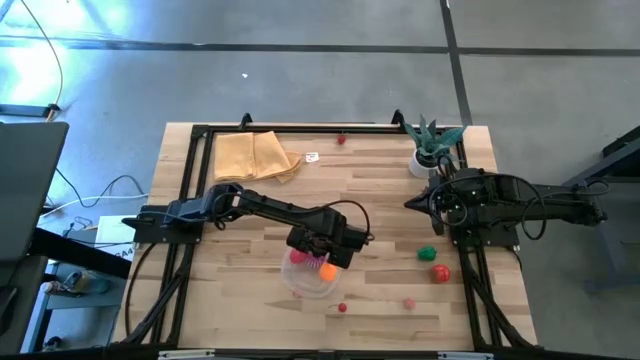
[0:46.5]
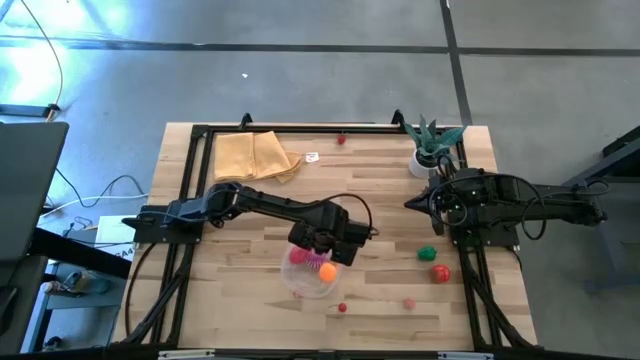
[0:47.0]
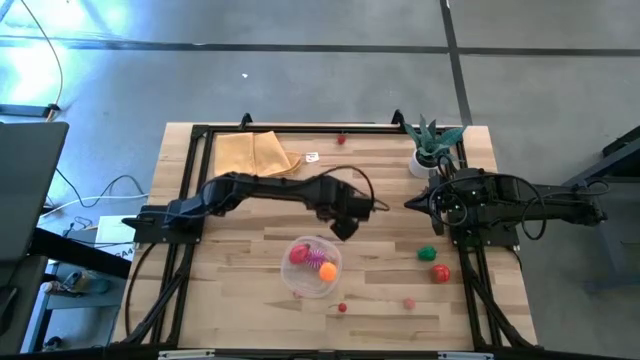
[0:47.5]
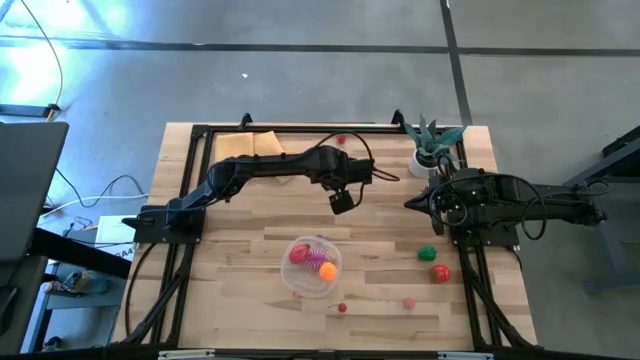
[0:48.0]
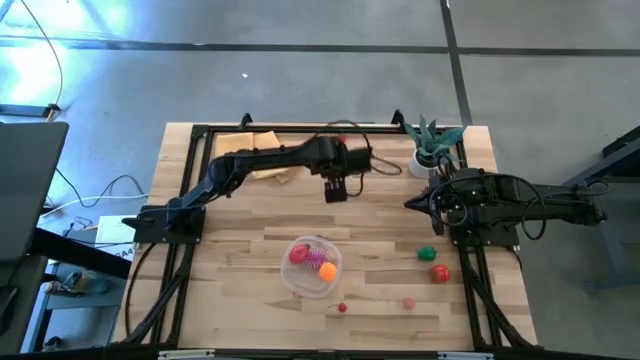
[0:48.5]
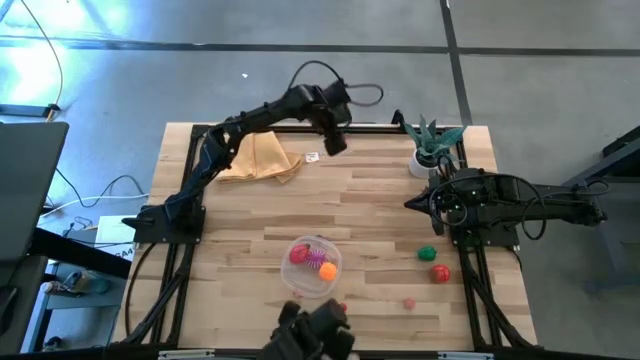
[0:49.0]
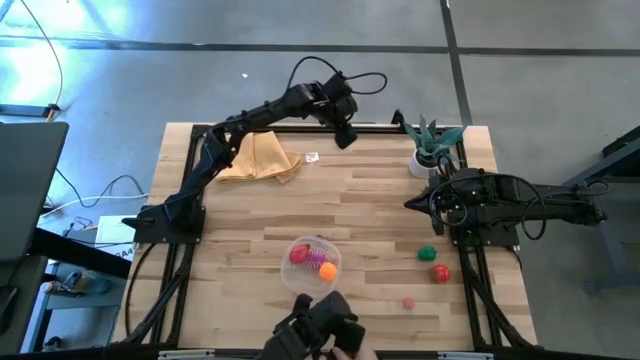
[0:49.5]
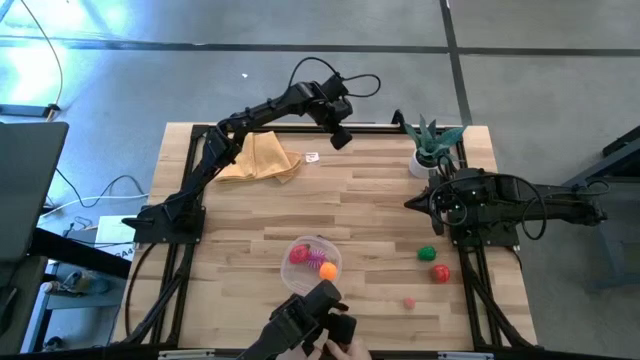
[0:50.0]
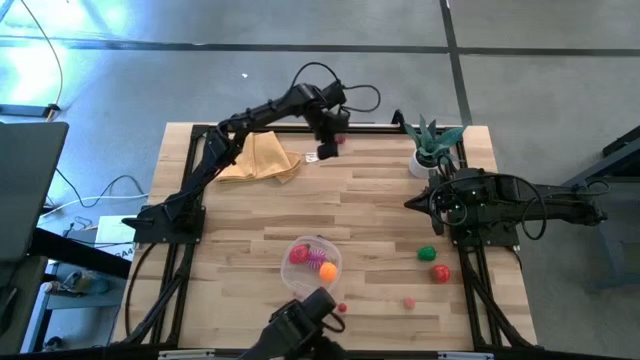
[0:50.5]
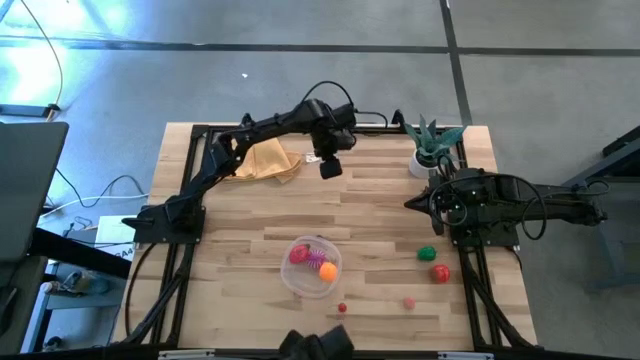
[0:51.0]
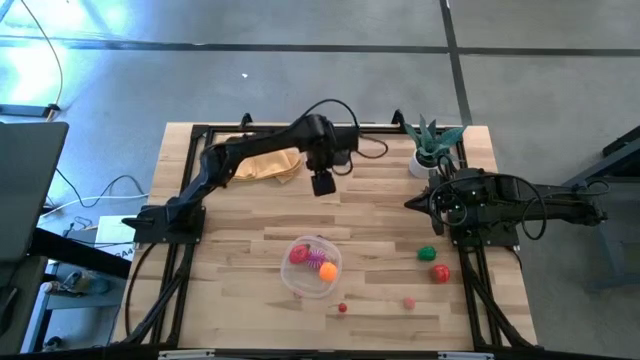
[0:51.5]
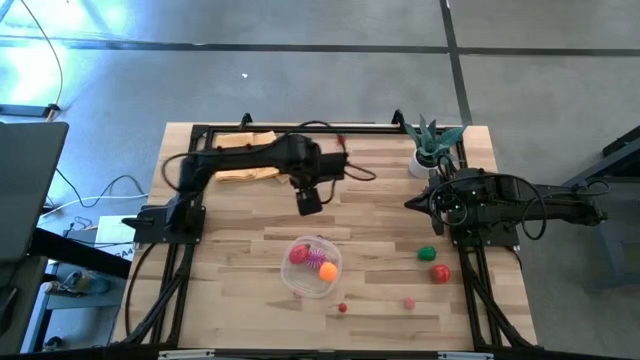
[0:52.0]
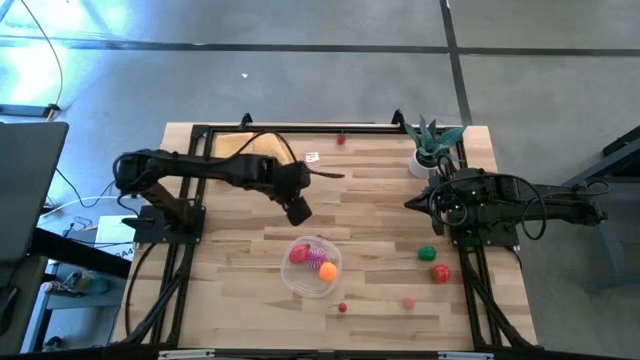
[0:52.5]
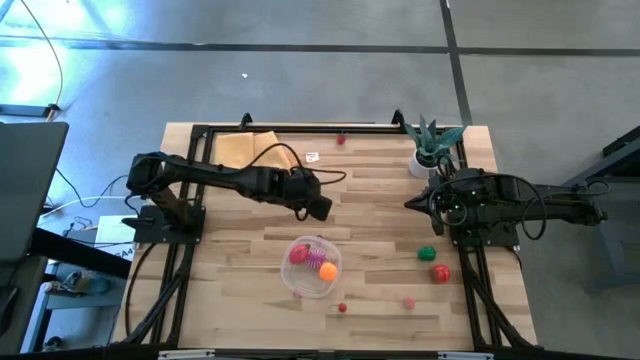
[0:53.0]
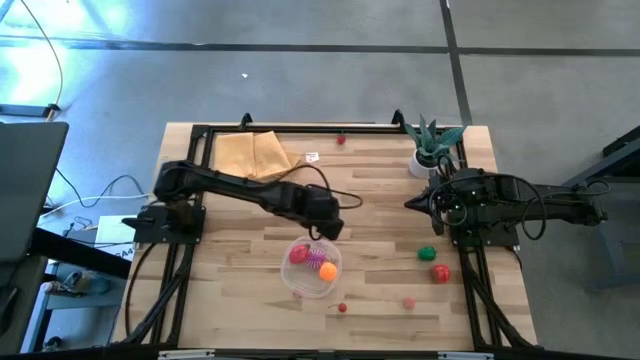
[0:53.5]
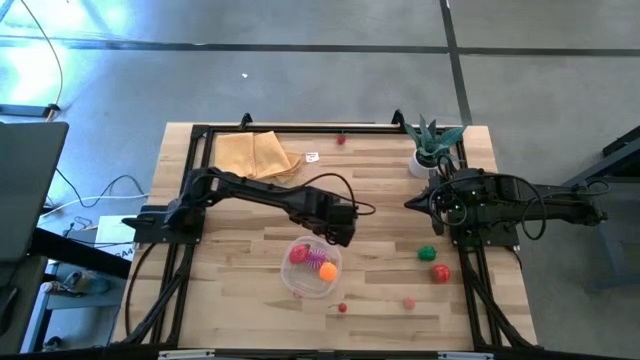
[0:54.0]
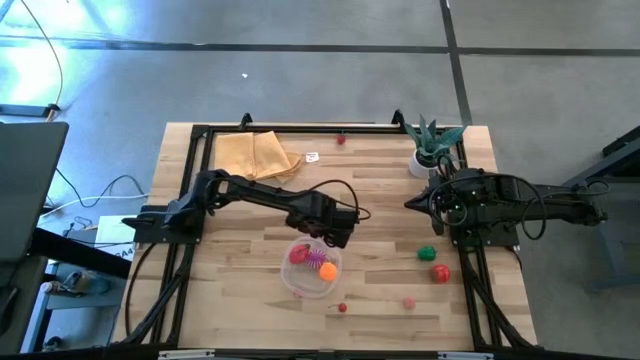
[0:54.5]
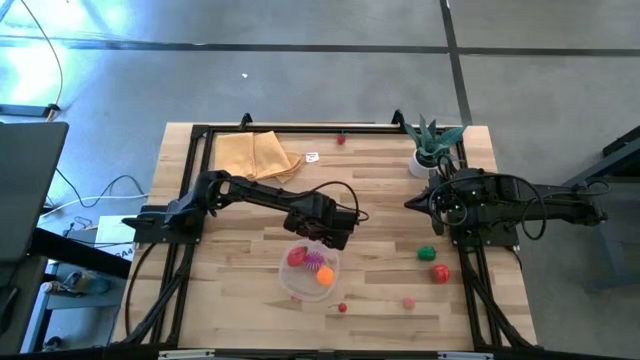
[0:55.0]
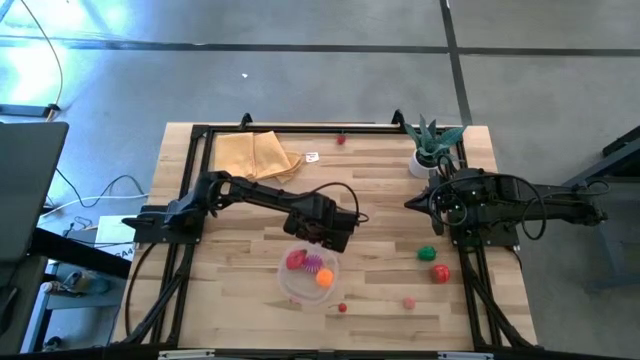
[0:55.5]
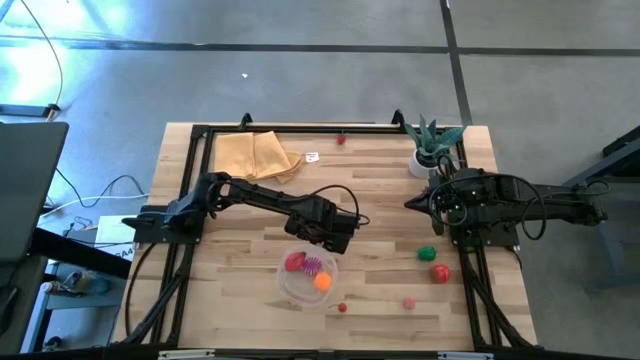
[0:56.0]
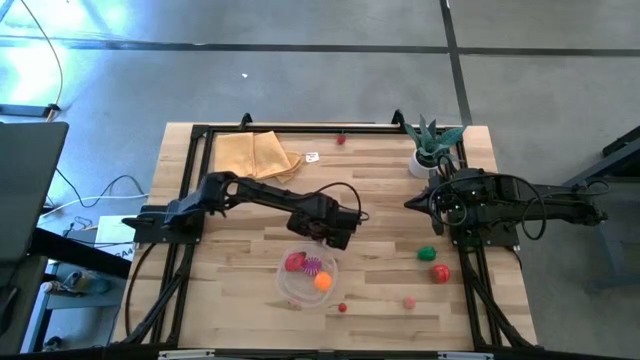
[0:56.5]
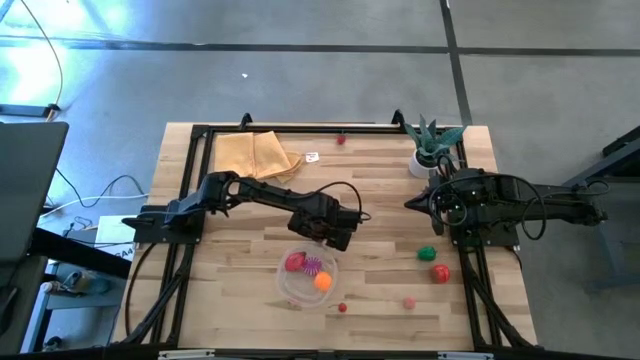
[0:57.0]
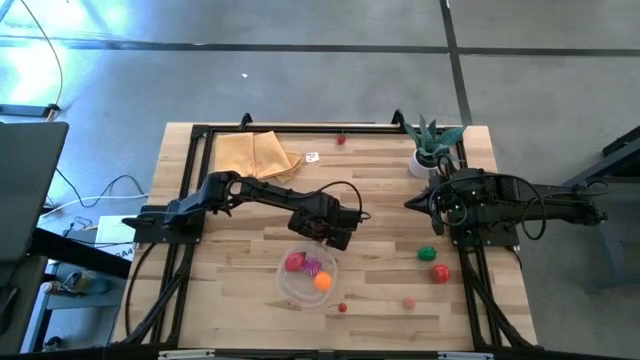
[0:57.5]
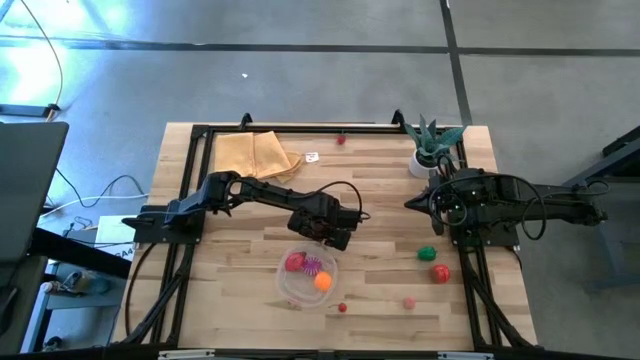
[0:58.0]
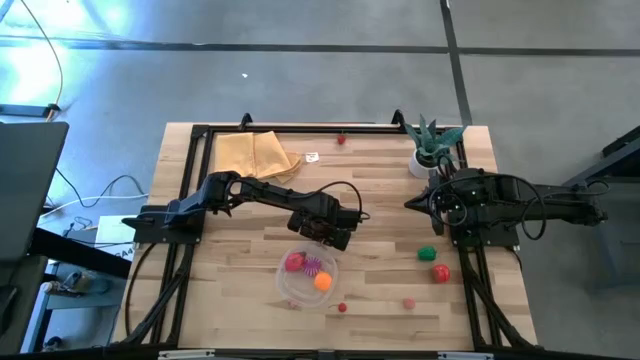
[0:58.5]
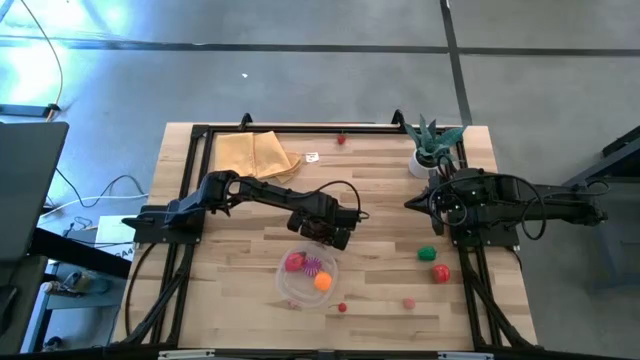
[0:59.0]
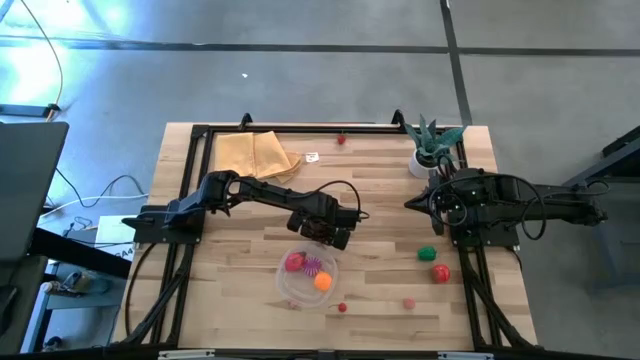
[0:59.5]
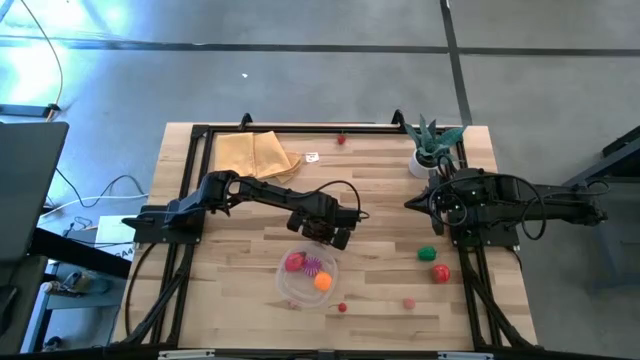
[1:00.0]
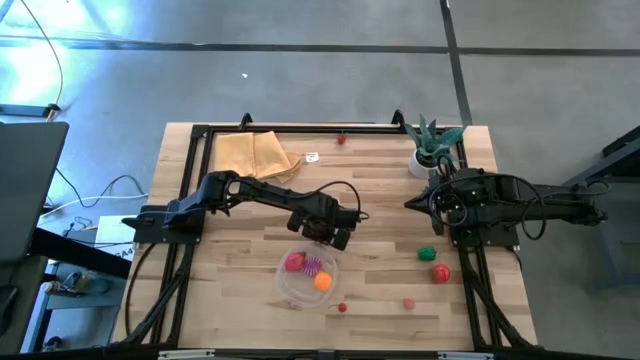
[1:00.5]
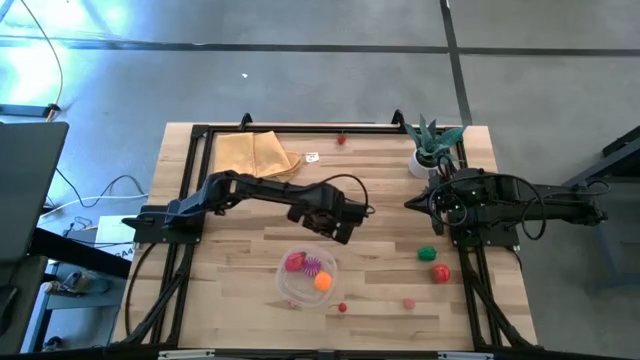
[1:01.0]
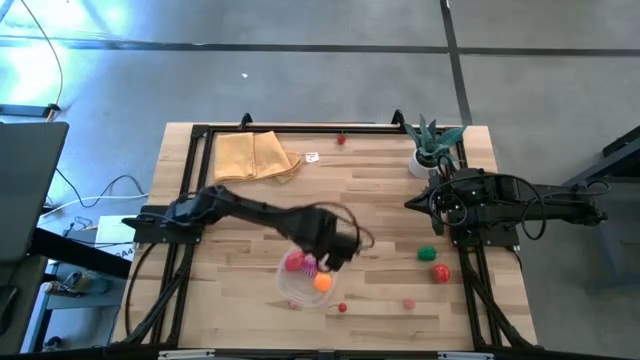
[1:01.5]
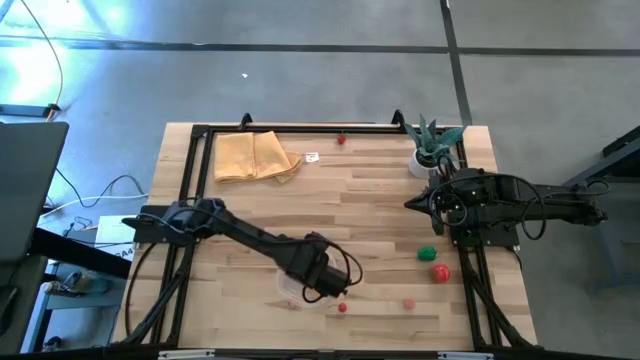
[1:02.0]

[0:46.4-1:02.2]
Task: Pick and placing Produce into tupperware
Put the top cherry into the bin

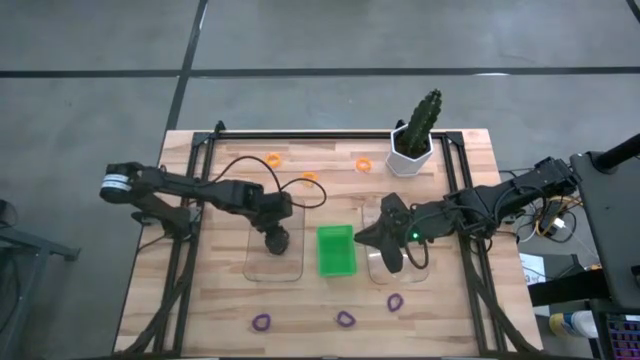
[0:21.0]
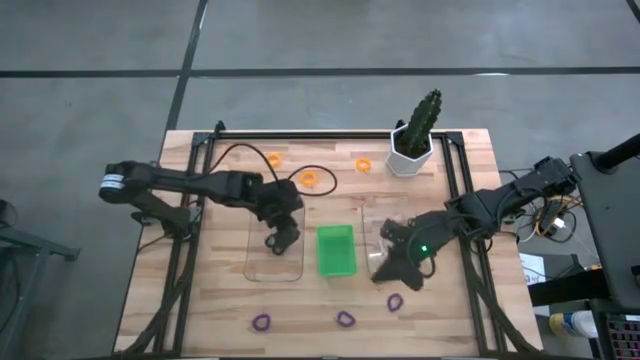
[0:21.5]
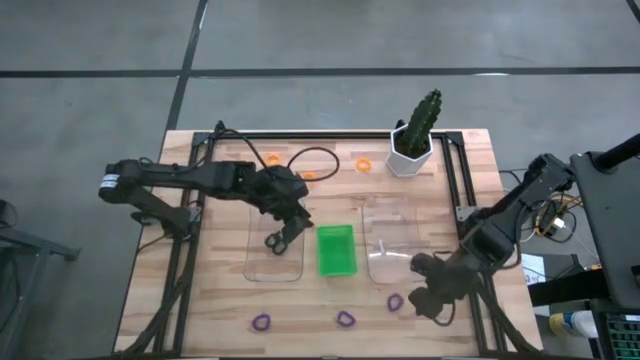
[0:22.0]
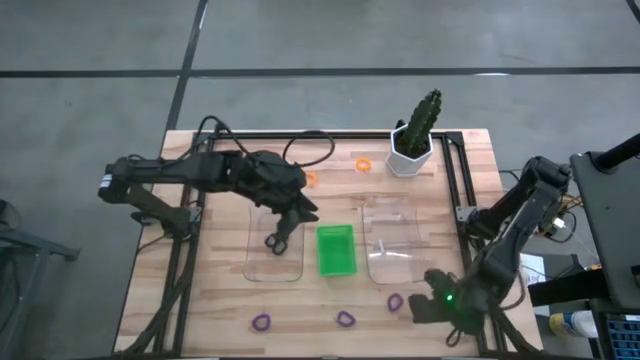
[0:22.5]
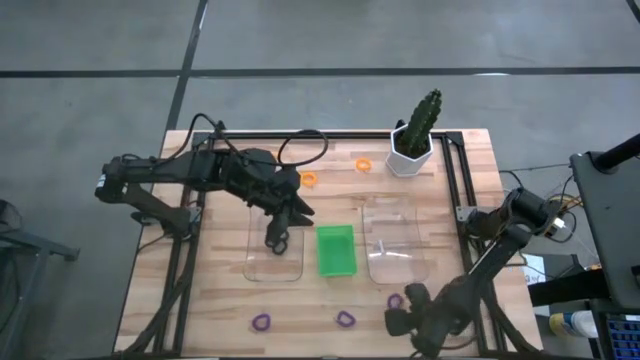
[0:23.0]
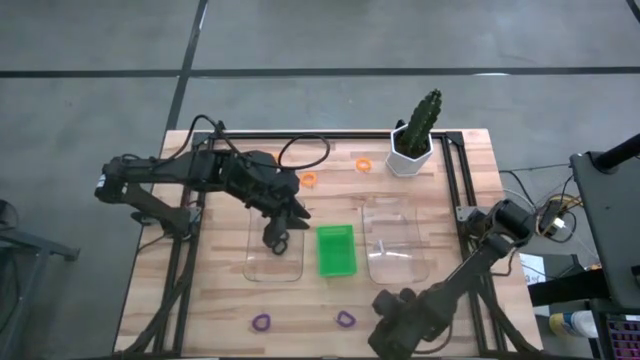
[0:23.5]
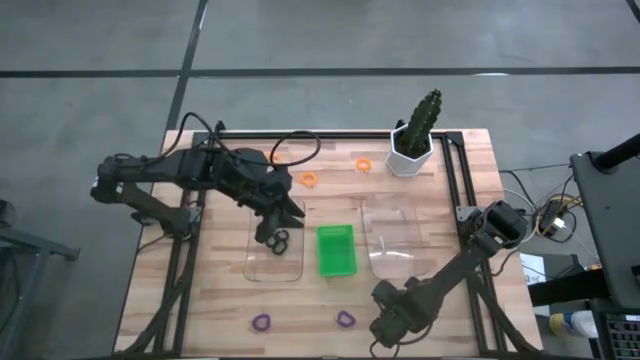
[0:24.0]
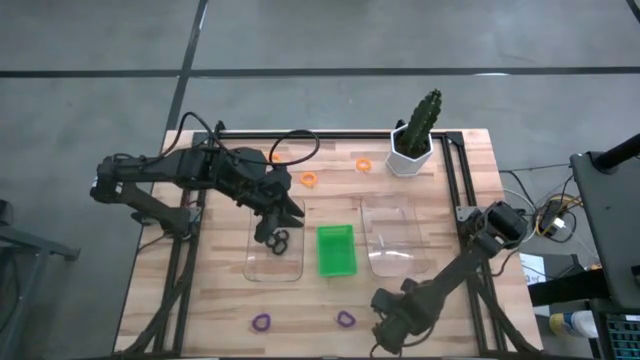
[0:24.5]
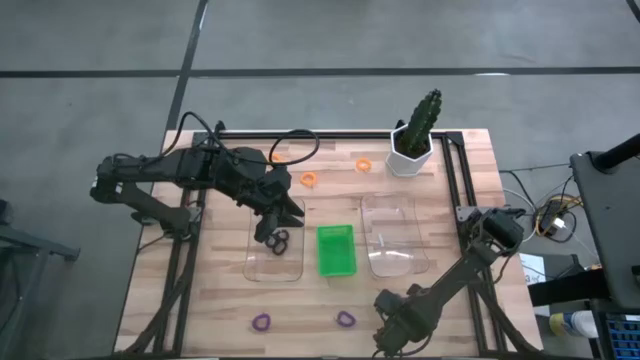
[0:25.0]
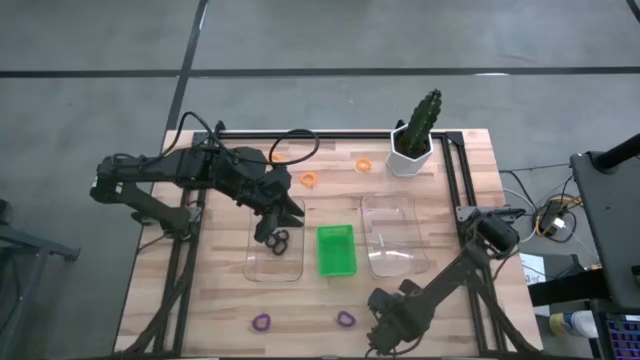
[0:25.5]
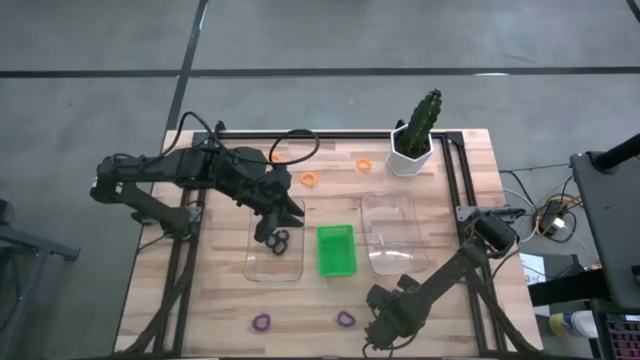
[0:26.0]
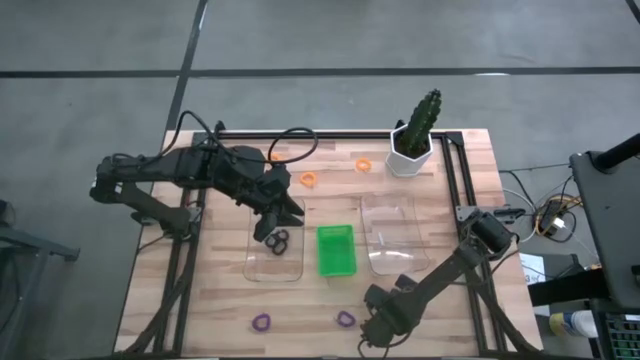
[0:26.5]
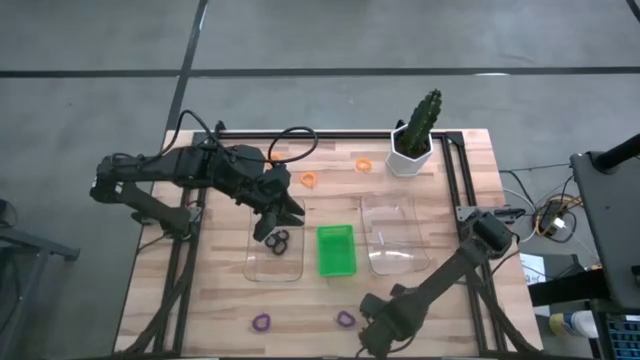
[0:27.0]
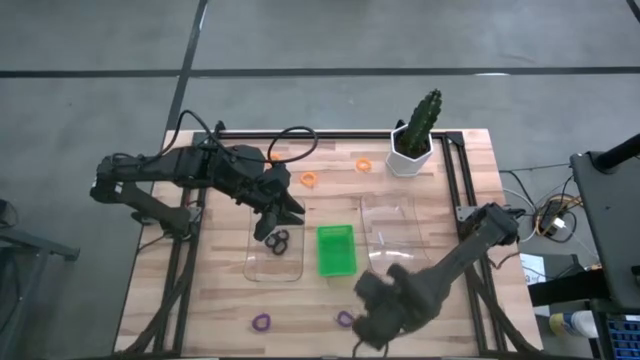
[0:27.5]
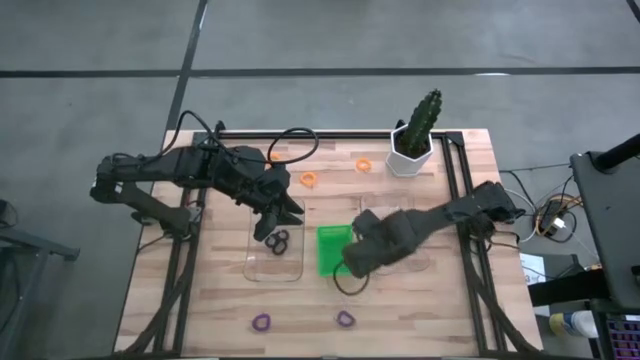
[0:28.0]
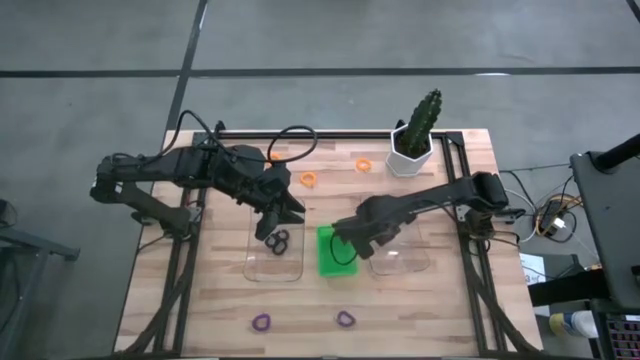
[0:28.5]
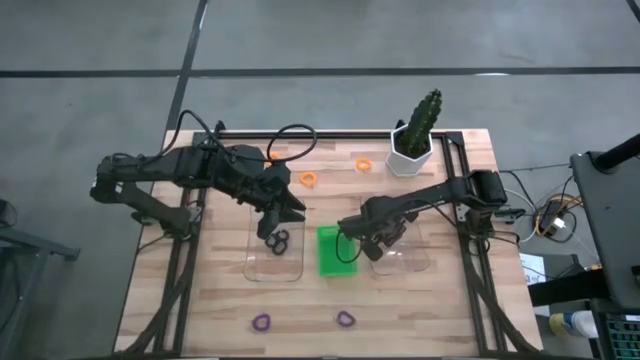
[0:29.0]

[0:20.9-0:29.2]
Task: Sort spring keychains
Put the right violet spring keychain into the right transparent bin
